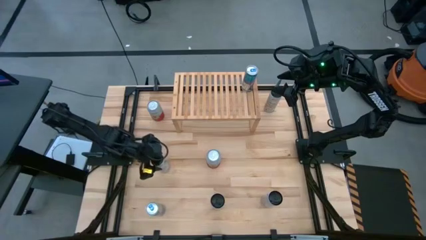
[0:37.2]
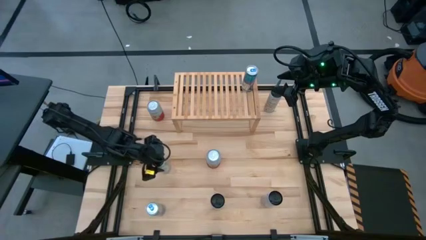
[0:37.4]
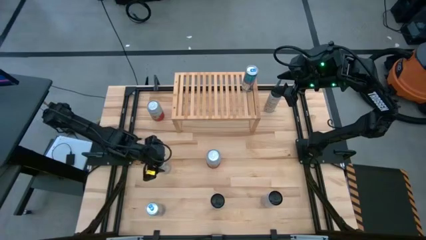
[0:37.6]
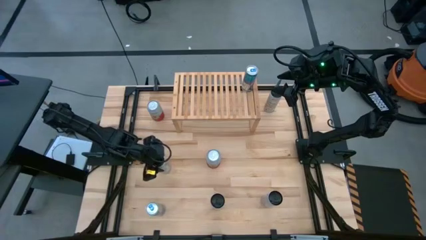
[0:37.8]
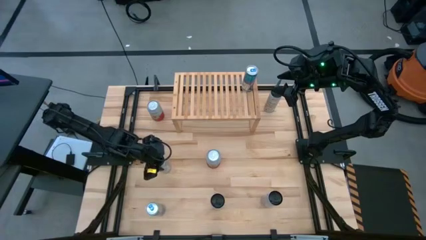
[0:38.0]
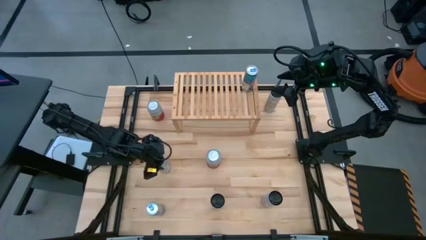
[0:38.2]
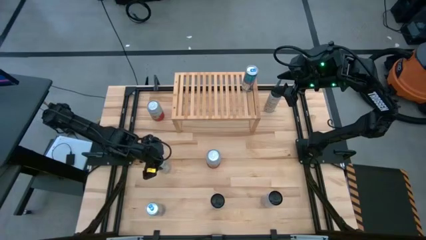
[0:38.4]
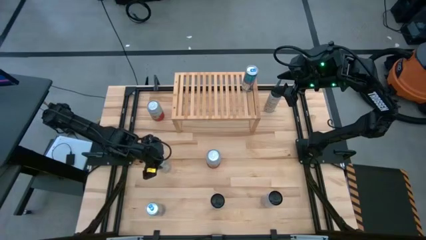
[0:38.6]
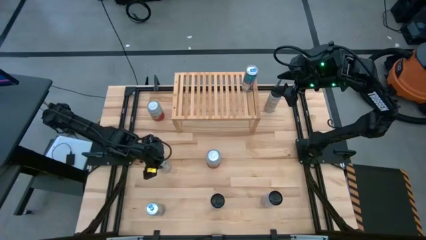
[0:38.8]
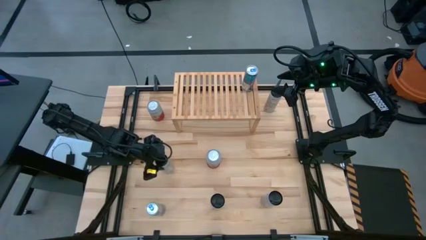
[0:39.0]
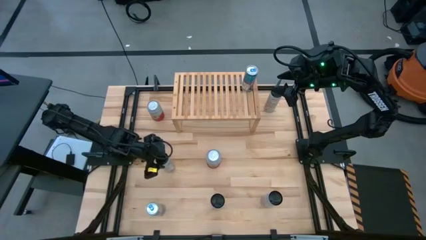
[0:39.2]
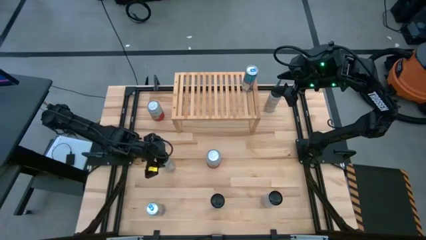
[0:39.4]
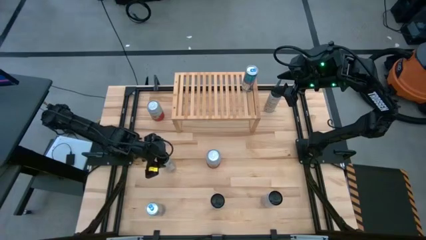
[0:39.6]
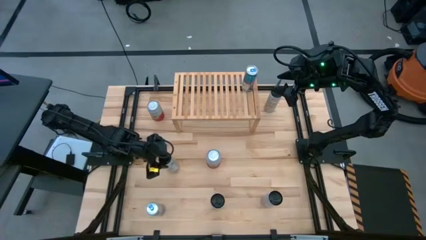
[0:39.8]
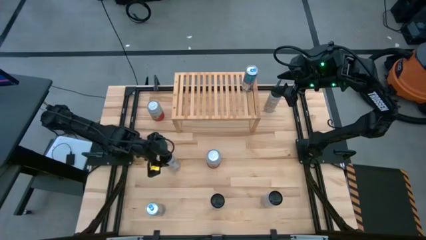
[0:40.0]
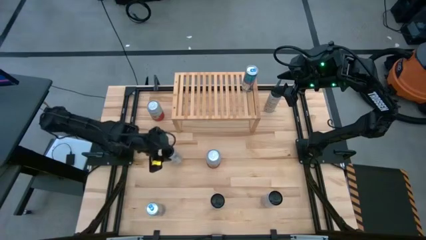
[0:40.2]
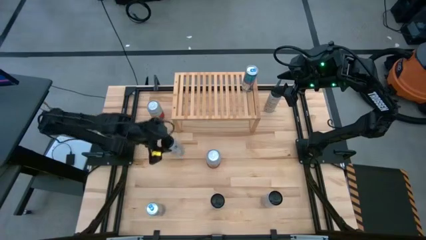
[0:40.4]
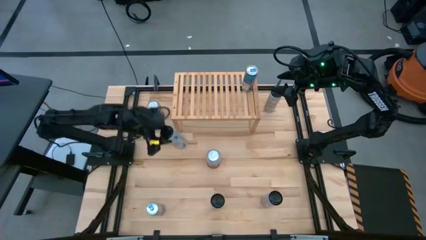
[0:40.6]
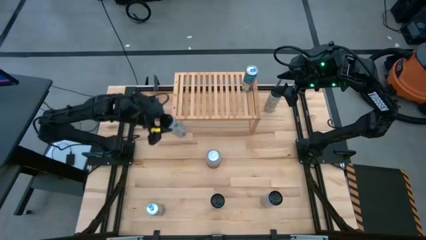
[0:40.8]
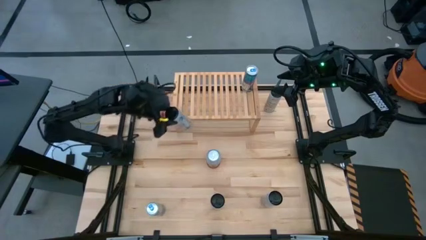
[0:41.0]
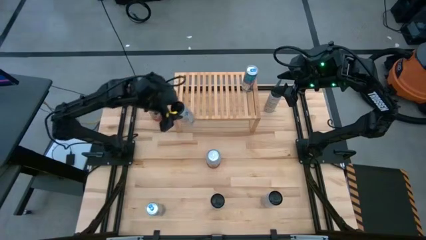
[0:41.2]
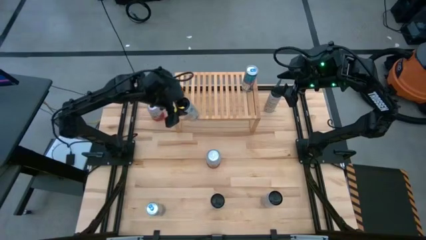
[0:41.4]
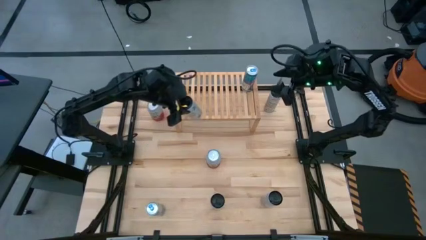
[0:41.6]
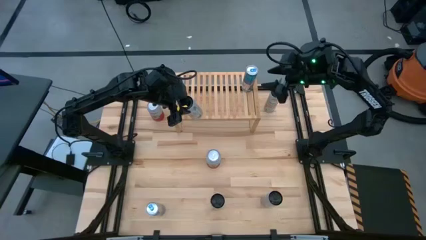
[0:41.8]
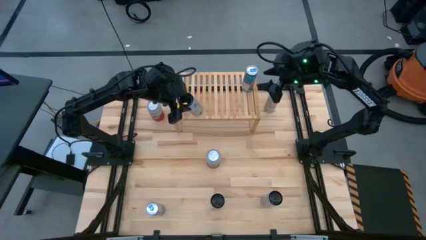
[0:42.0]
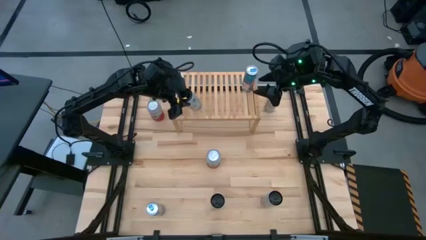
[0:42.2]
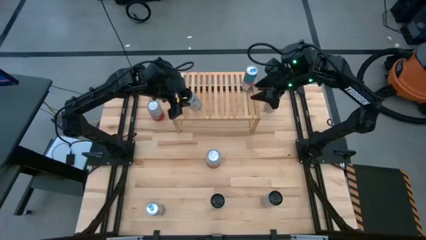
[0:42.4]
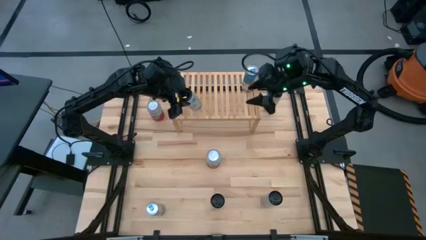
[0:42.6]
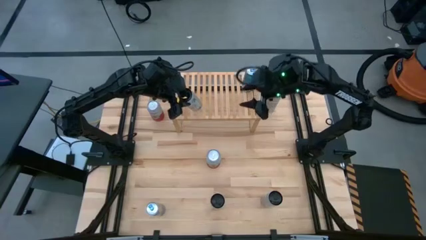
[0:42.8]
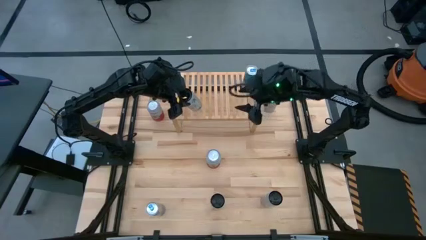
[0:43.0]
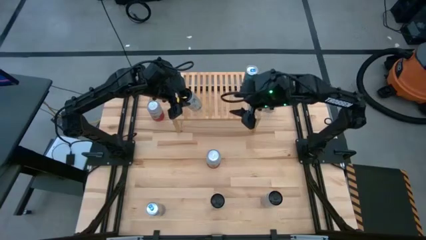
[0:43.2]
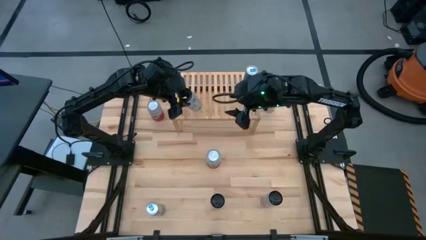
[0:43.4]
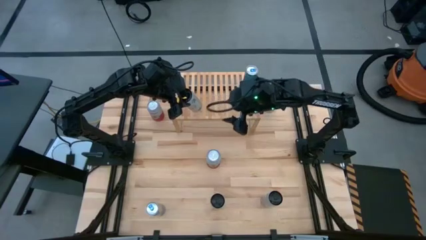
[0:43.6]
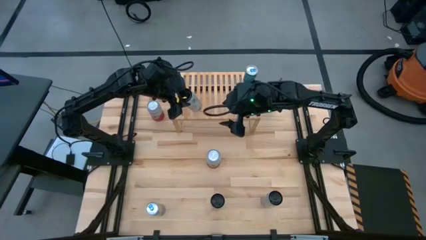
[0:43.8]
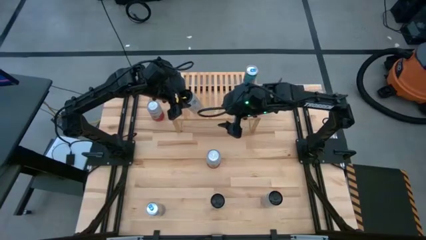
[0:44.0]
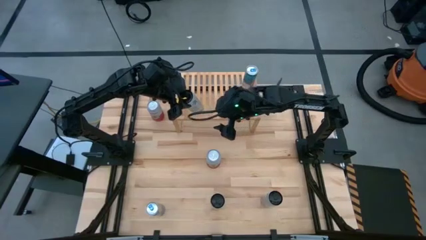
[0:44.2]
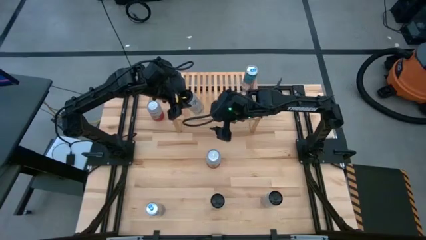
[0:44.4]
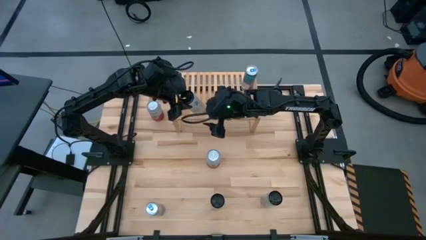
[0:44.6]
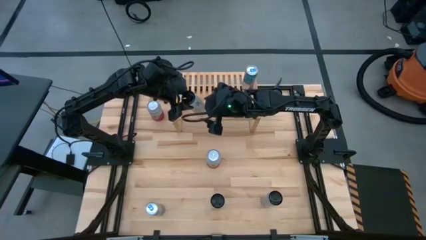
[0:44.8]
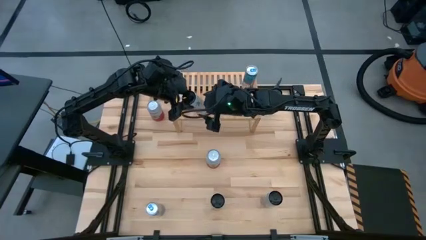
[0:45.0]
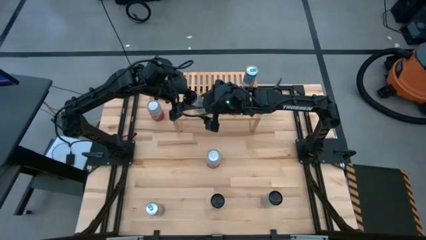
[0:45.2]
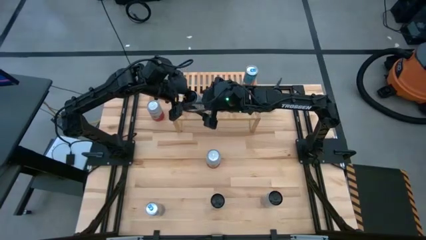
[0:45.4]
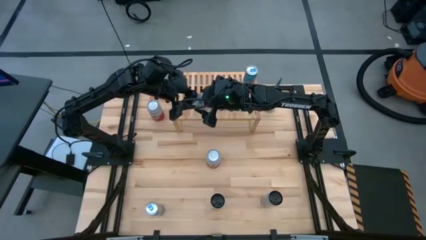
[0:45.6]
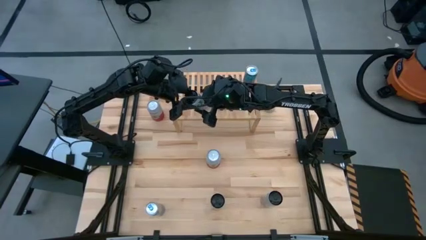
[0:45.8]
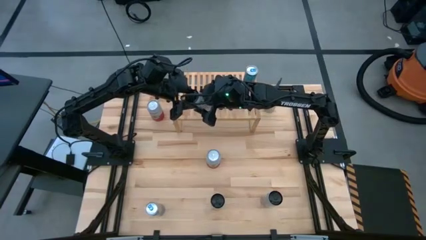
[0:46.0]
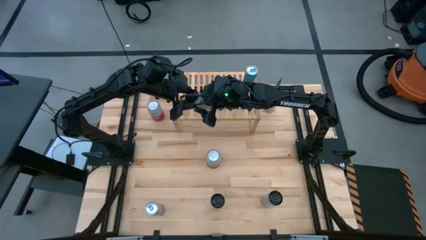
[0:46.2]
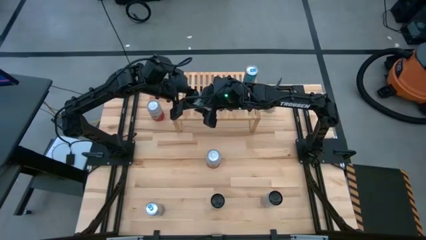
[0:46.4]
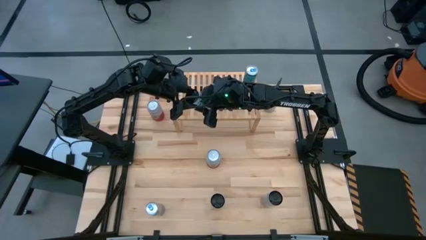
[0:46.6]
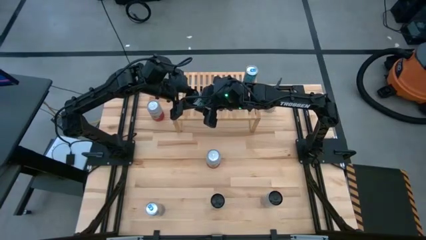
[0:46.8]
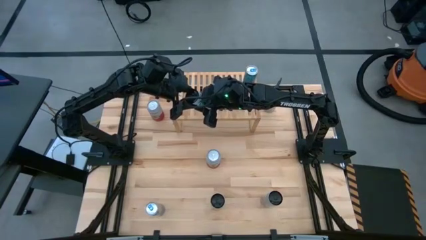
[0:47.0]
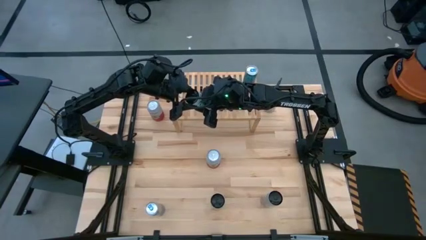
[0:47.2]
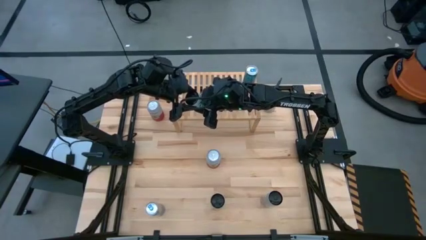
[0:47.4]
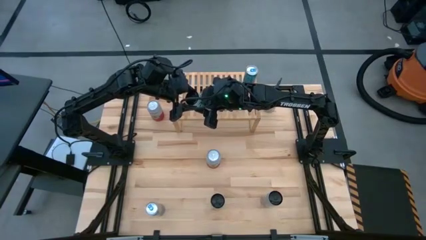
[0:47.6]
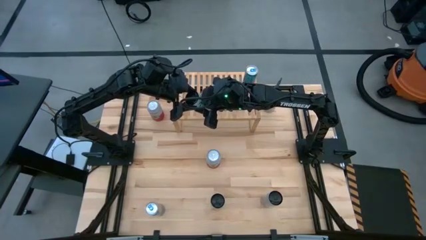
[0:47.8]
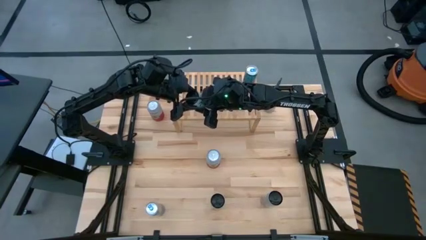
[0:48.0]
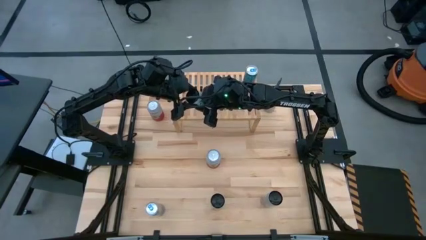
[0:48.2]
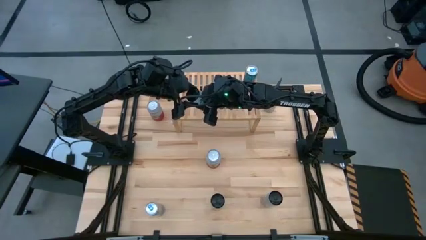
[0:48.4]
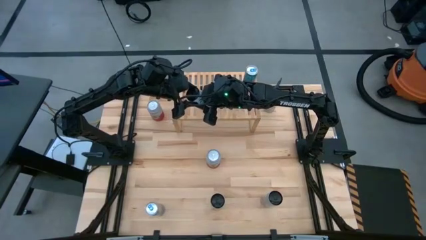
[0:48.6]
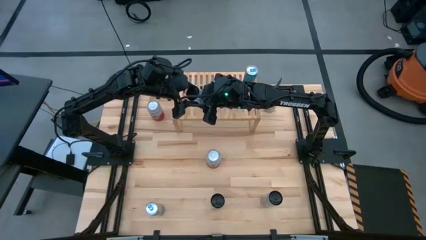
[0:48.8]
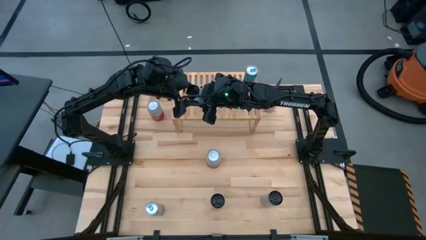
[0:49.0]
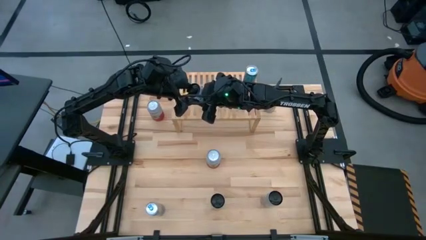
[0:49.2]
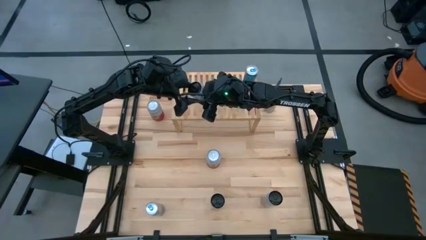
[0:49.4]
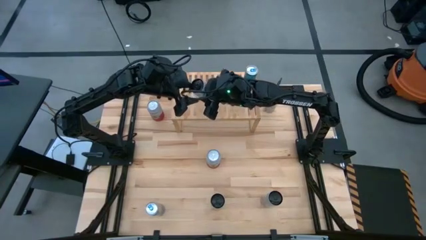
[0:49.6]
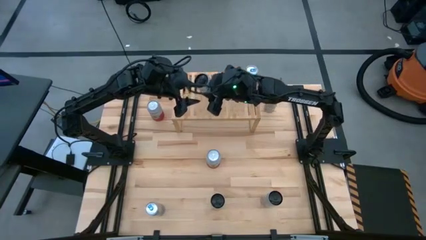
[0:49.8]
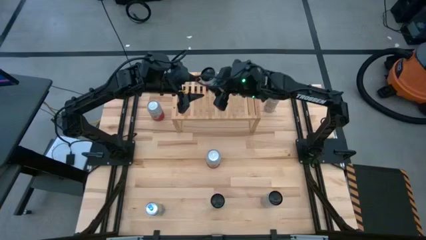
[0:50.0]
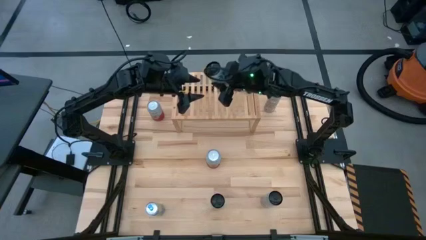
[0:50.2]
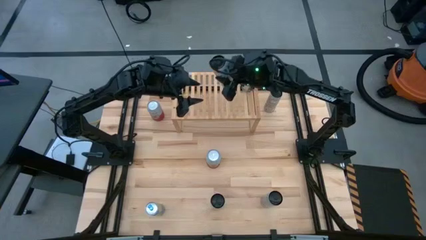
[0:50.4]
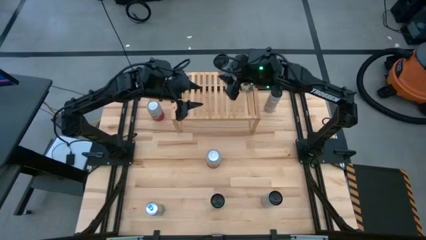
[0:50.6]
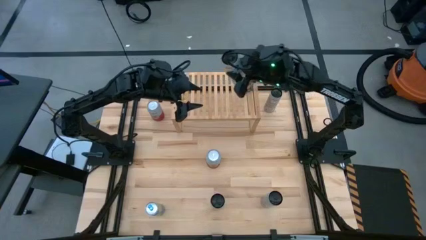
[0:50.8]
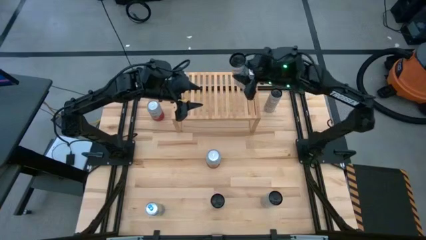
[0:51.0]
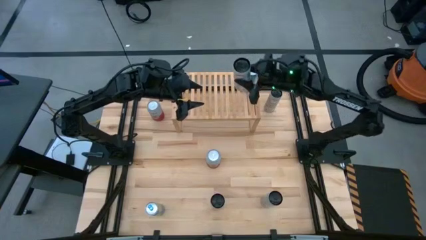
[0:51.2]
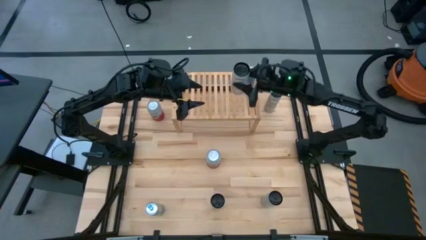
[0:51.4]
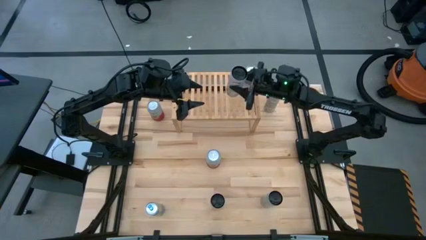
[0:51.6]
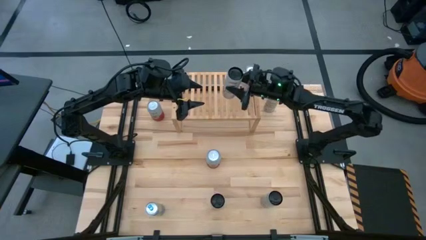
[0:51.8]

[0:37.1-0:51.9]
Task: Place canned beverage on shelf
Put the left white pink soda can on the shelf
